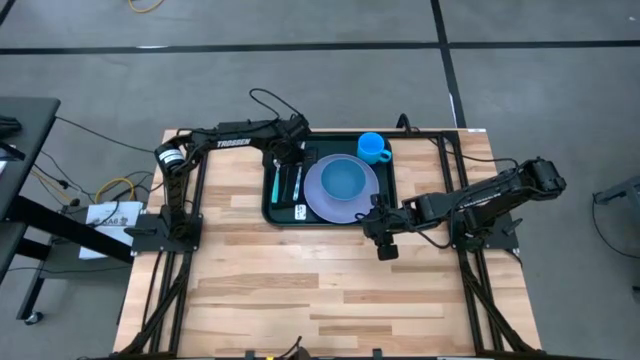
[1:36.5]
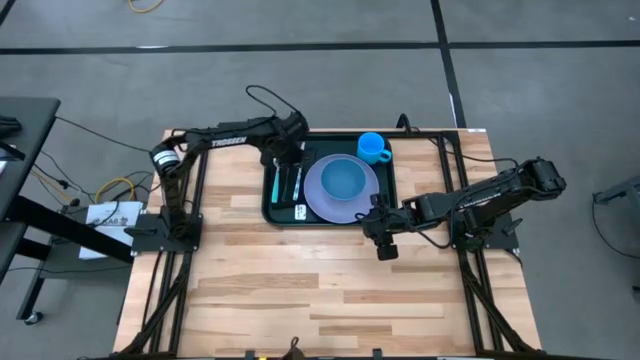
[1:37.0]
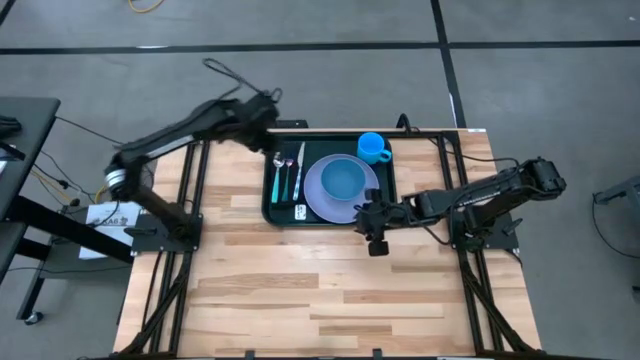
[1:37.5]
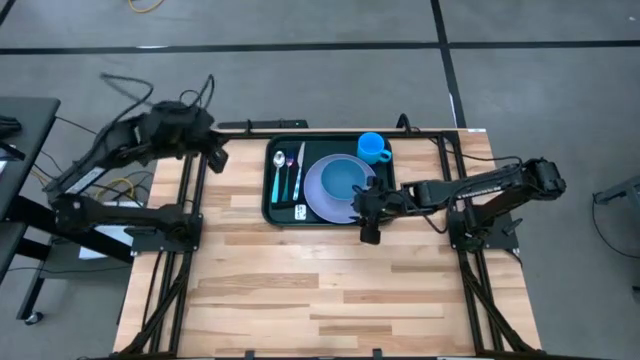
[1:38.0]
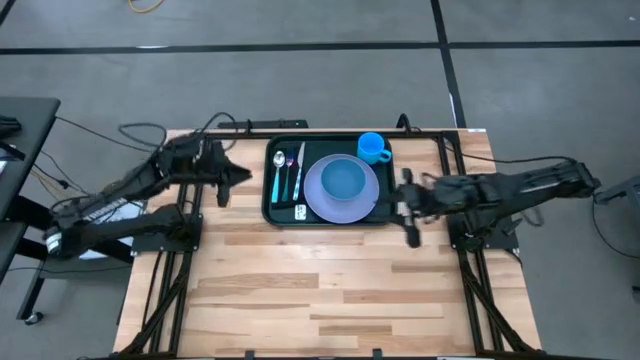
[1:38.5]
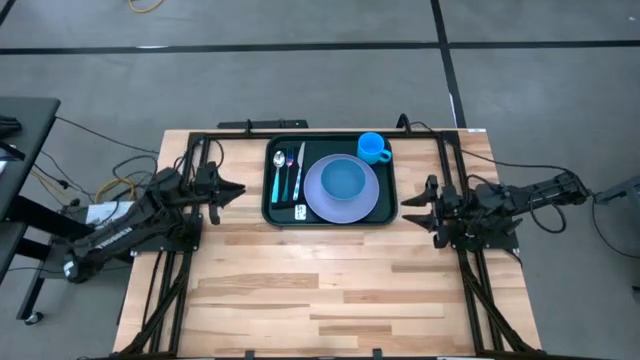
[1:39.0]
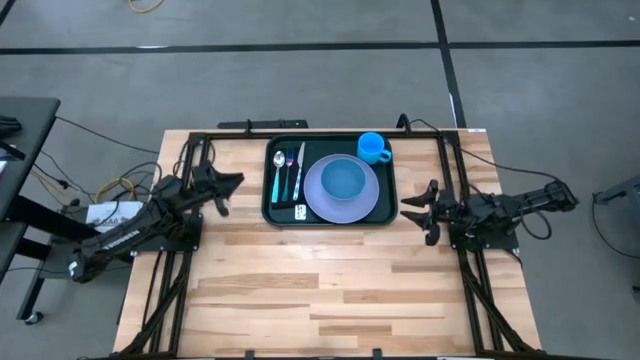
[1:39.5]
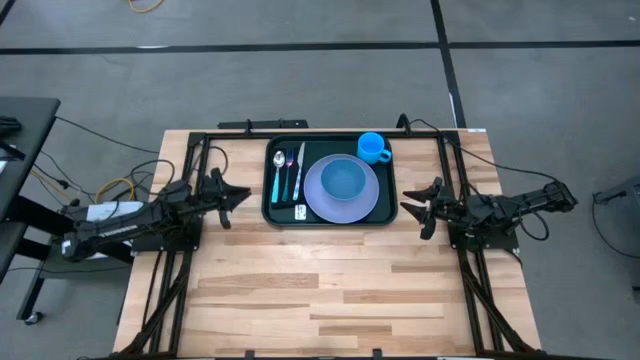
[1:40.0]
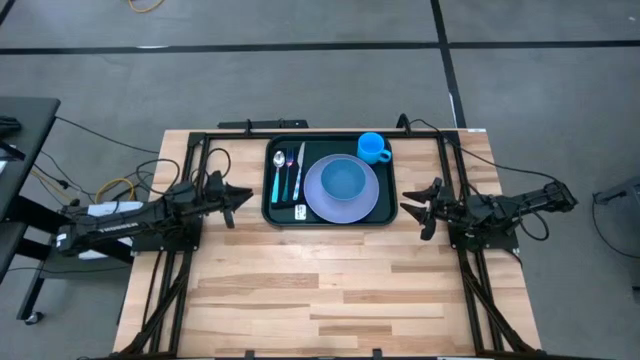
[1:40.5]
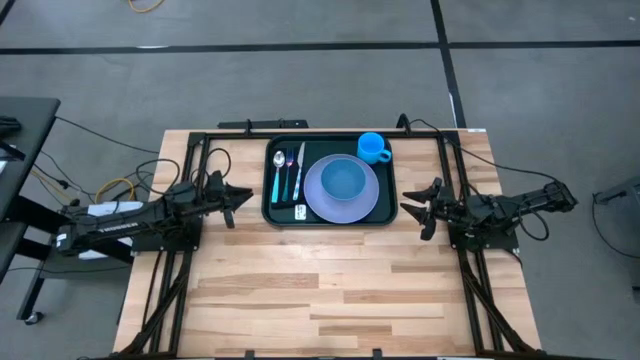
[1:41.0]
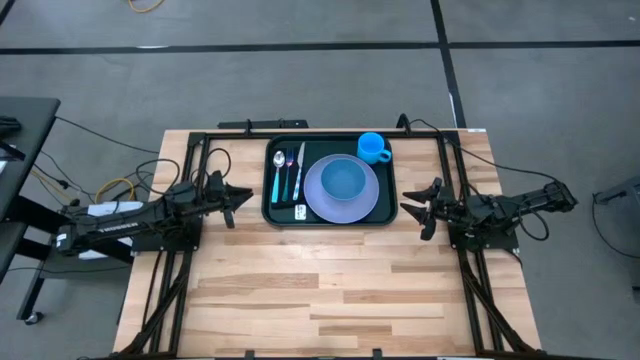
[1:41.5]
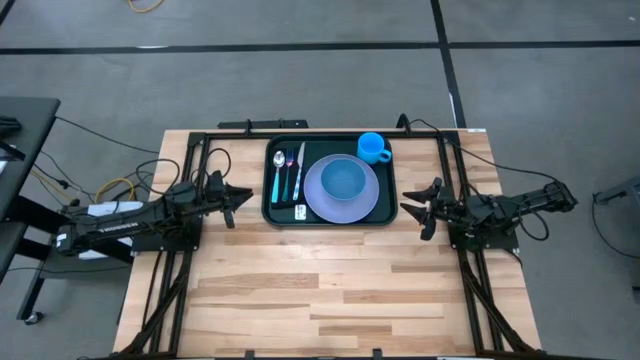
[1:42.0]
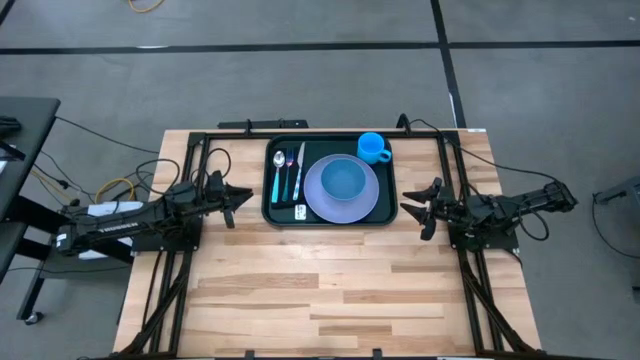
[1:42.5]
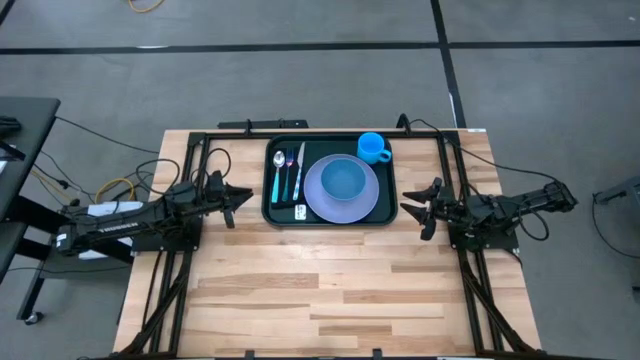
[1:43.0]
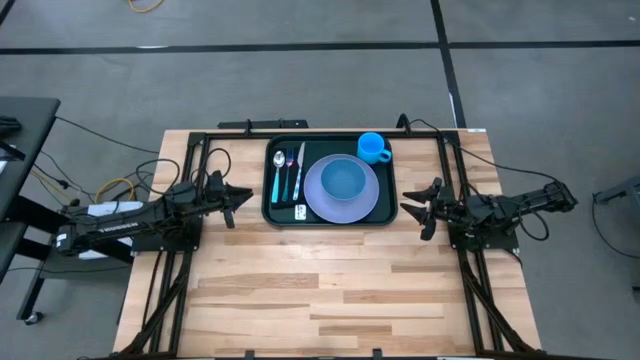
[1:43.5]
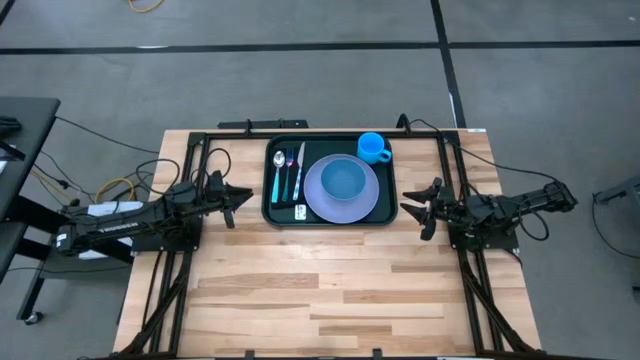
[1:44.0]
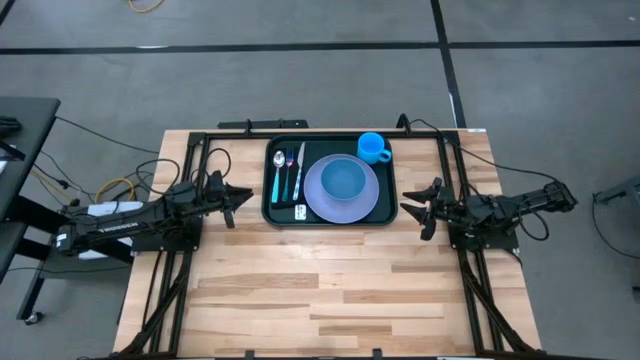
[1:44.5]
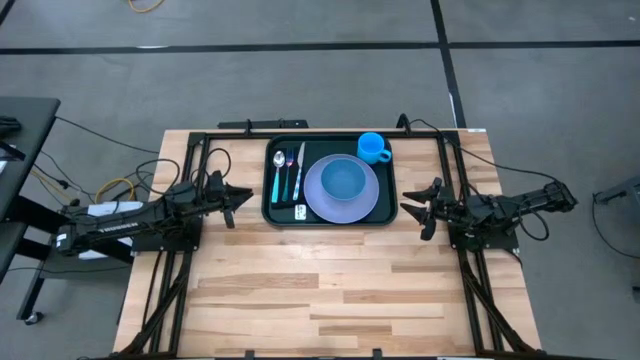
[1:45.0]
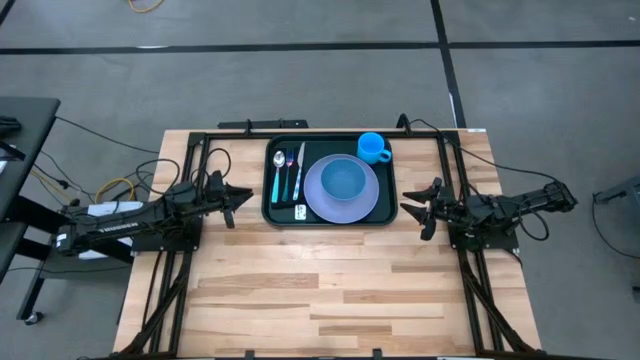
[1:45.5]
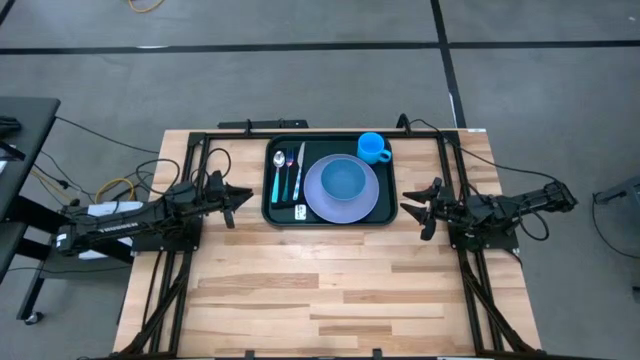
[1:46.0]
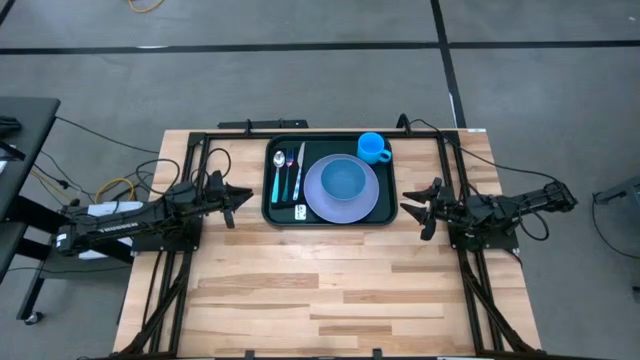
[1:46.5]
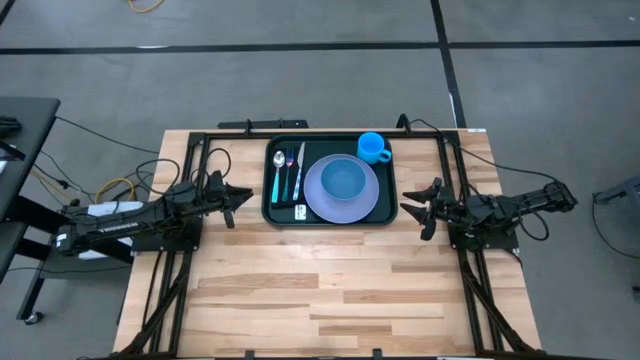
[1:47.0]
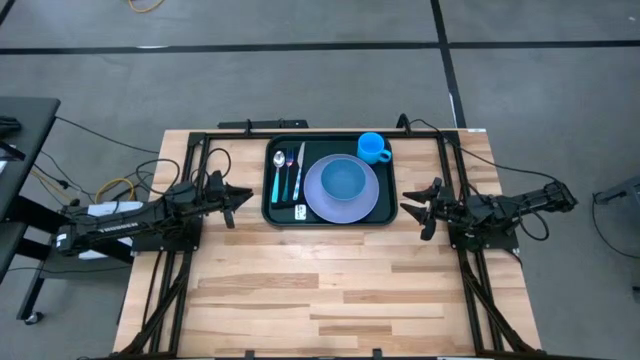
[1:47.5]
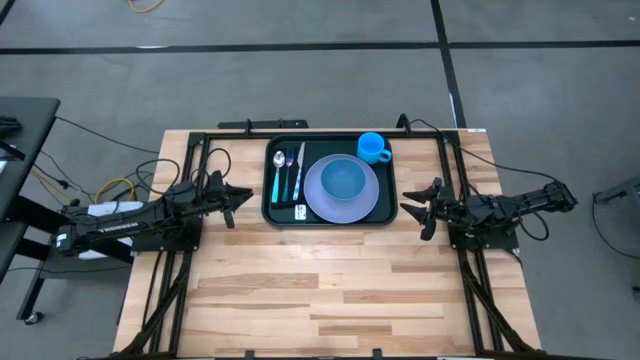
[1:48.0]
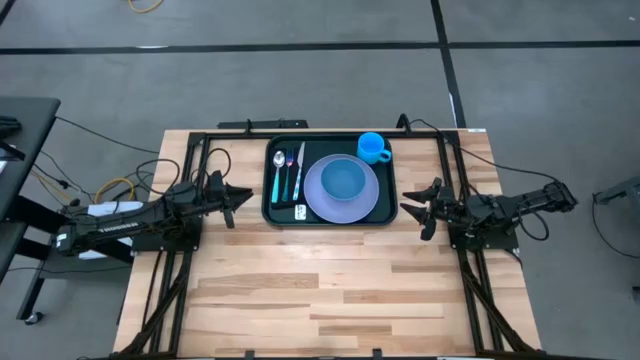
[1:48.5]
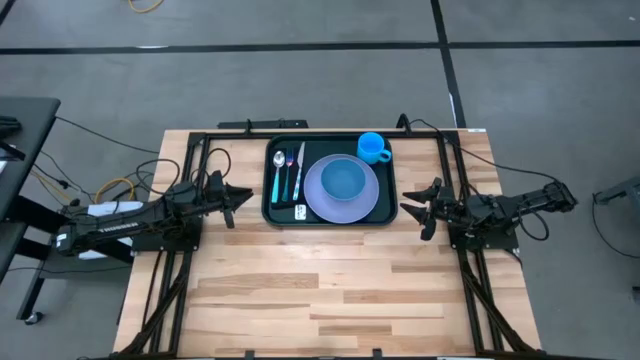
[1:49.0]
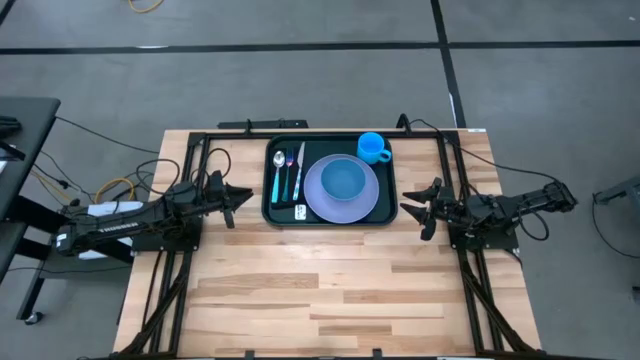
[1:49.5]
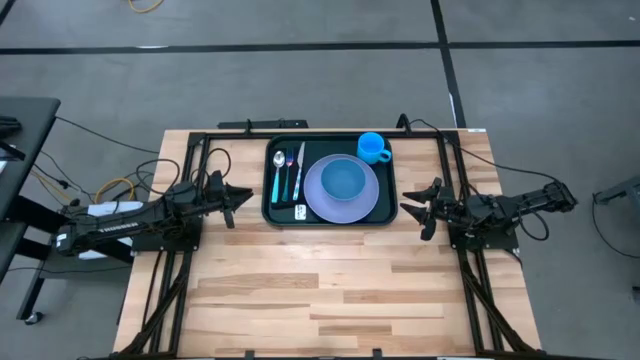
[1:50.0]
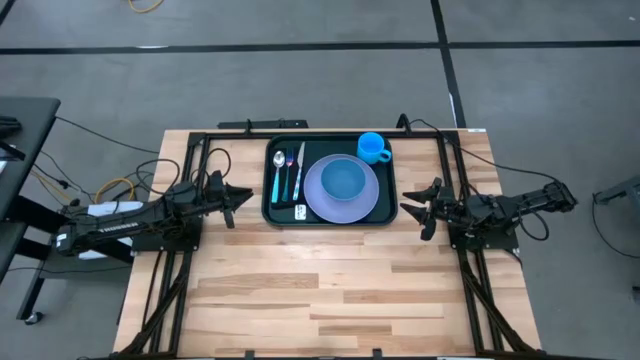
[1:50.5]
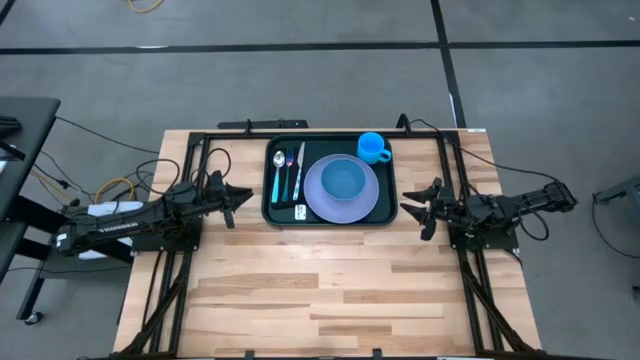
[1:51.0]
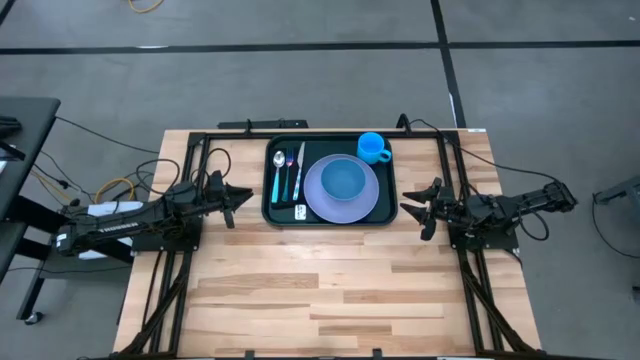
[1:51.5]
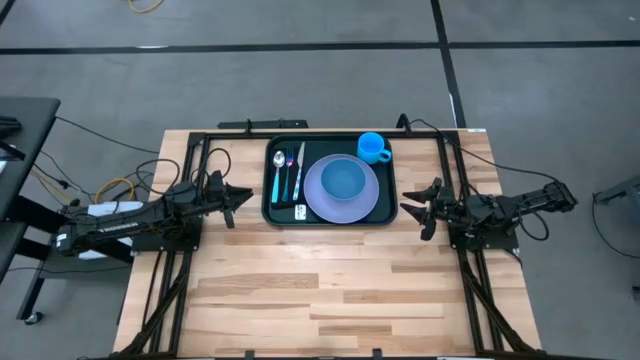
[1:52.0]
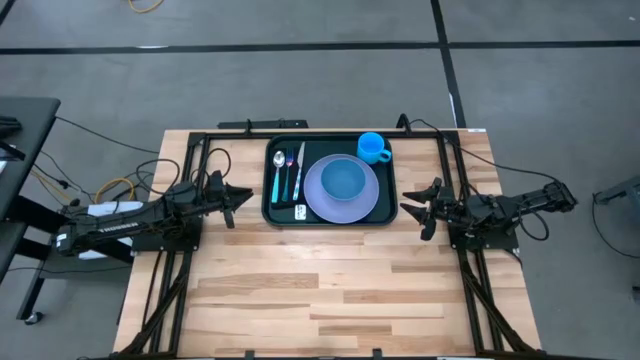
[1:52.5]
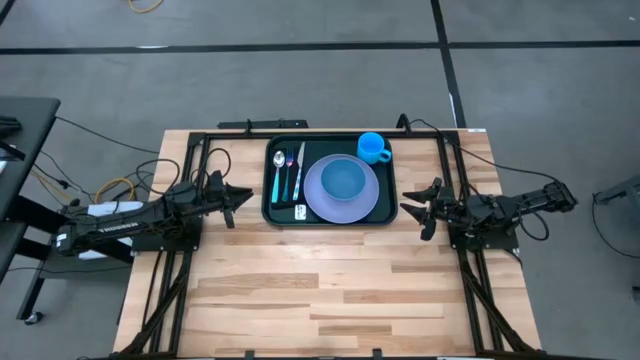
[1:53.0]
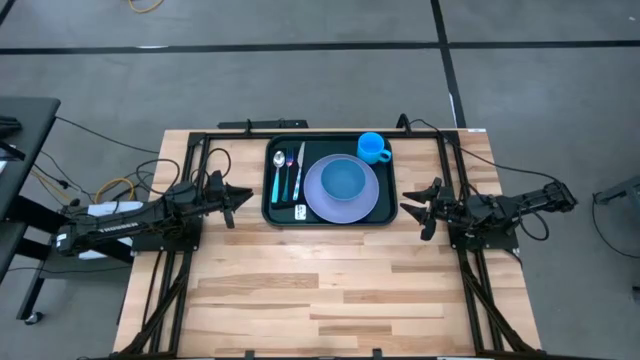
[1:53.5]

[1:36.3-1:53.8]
Task: Set up tray
Return to Home Position
